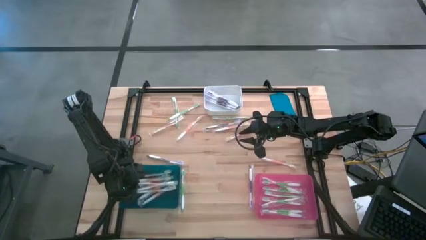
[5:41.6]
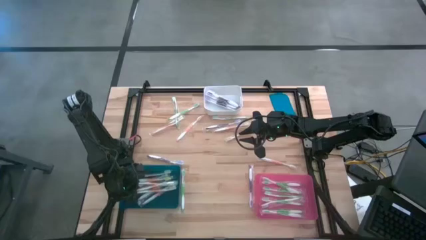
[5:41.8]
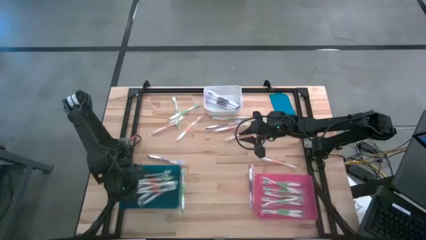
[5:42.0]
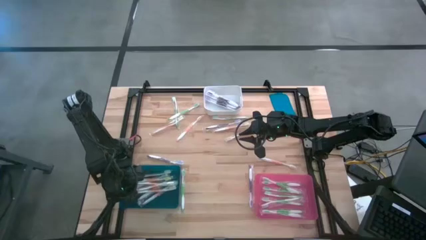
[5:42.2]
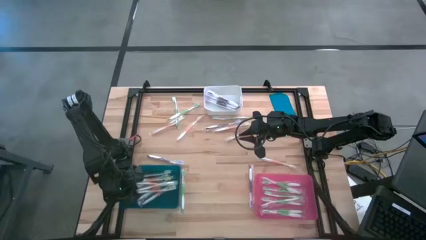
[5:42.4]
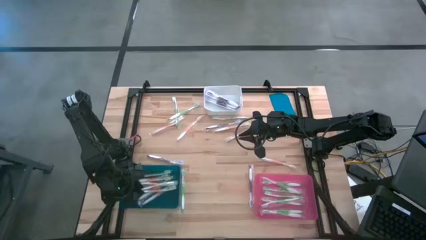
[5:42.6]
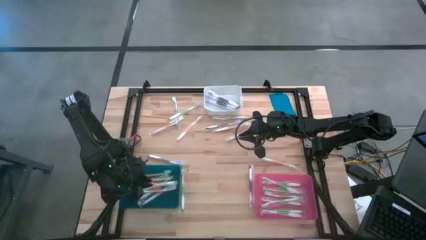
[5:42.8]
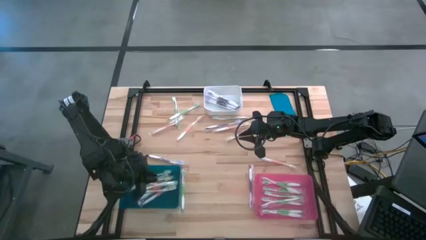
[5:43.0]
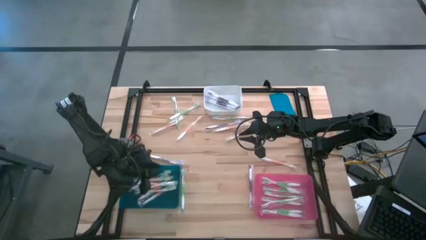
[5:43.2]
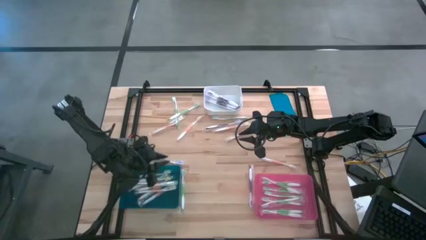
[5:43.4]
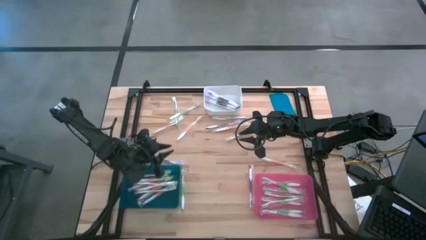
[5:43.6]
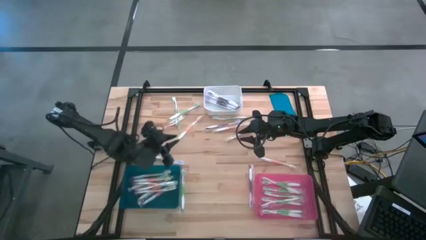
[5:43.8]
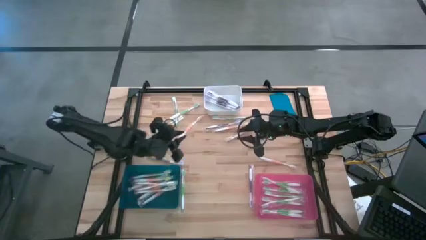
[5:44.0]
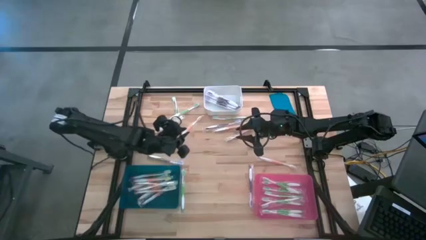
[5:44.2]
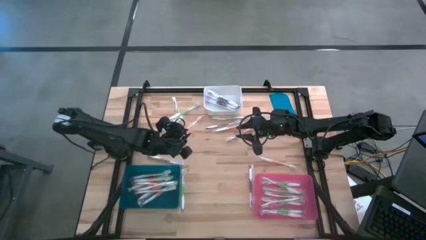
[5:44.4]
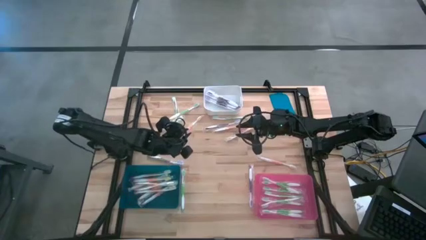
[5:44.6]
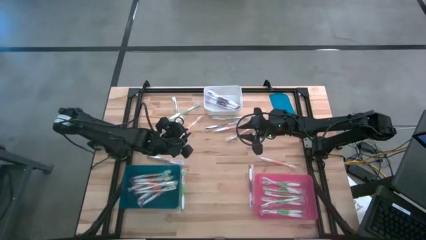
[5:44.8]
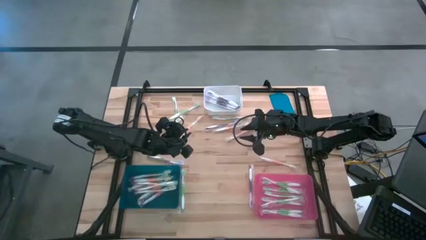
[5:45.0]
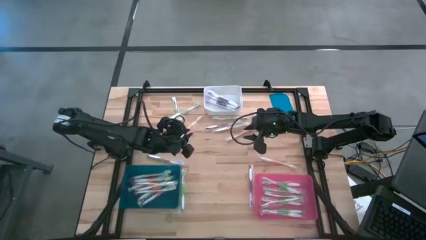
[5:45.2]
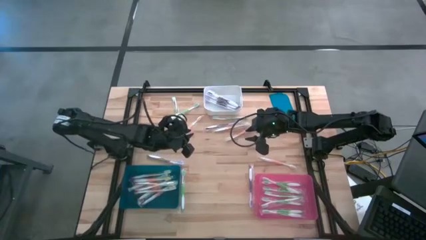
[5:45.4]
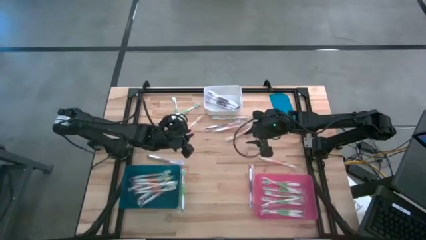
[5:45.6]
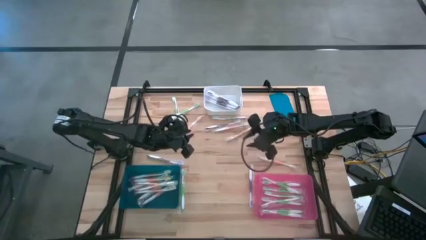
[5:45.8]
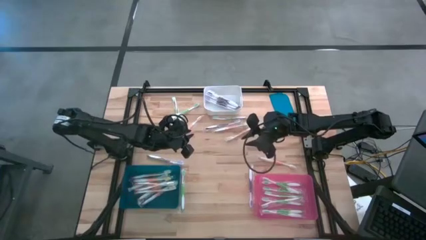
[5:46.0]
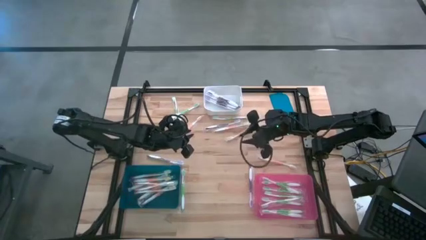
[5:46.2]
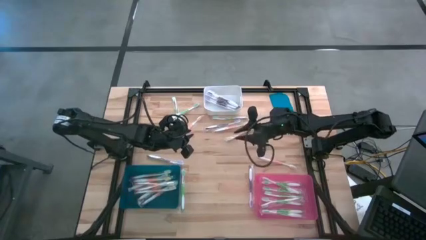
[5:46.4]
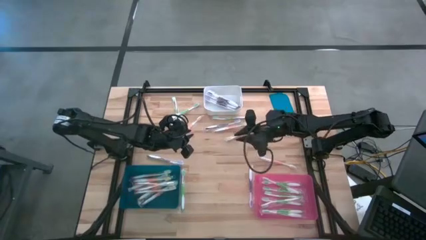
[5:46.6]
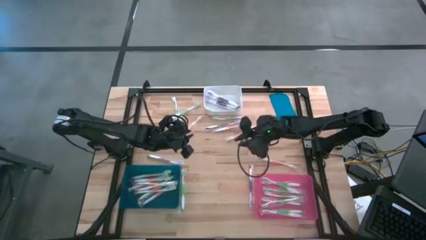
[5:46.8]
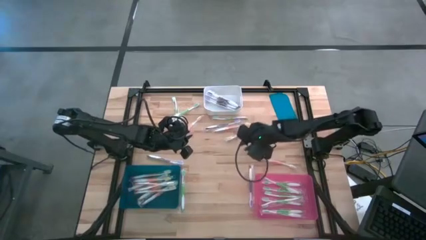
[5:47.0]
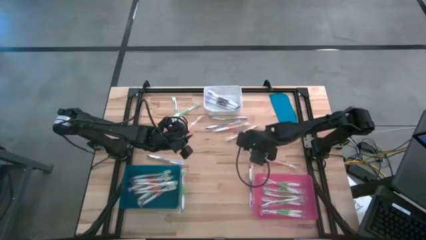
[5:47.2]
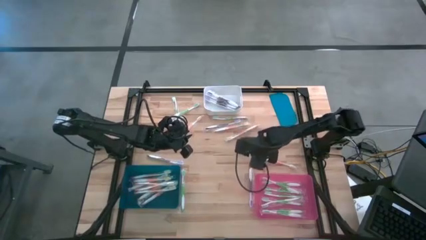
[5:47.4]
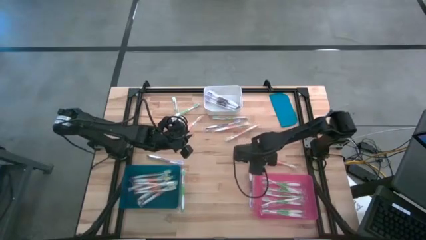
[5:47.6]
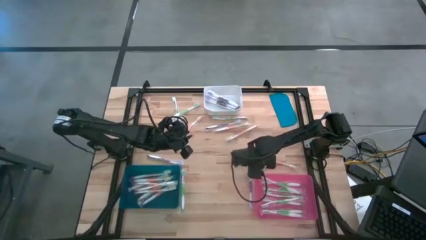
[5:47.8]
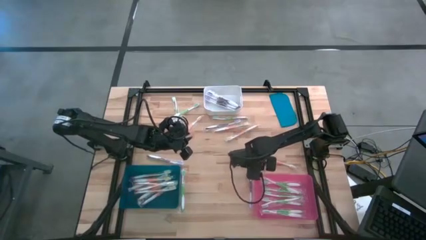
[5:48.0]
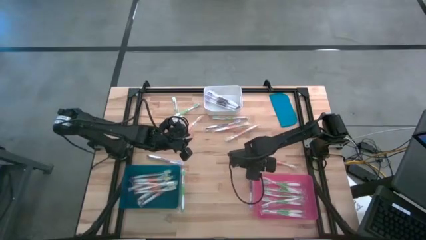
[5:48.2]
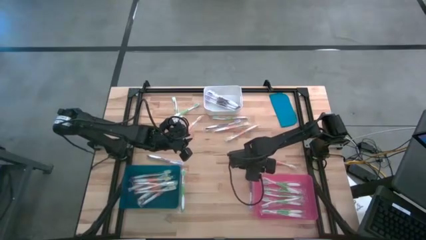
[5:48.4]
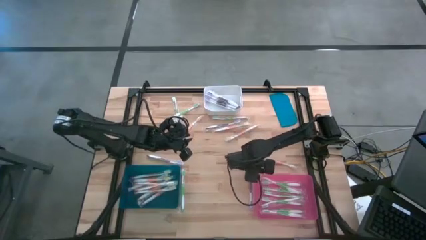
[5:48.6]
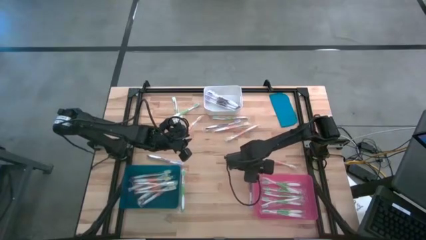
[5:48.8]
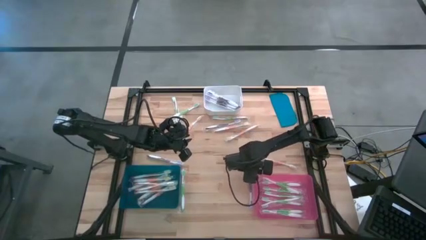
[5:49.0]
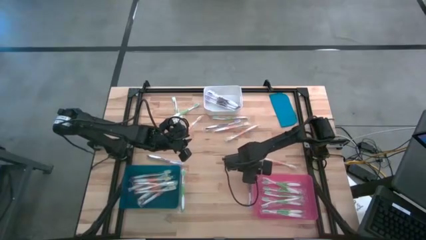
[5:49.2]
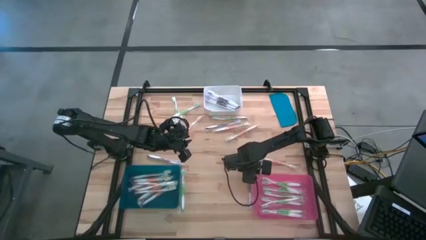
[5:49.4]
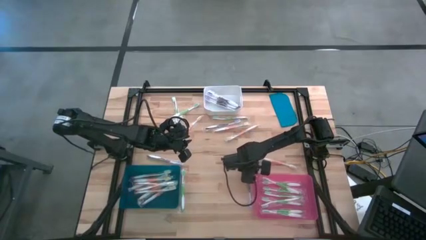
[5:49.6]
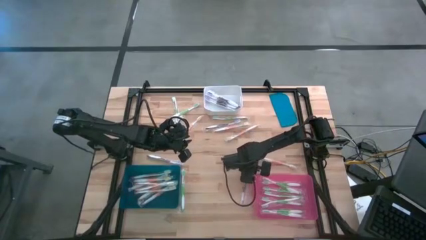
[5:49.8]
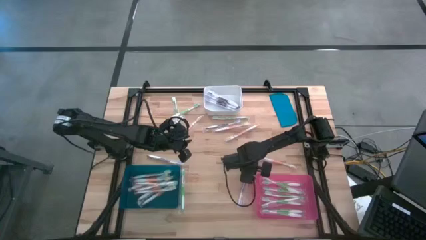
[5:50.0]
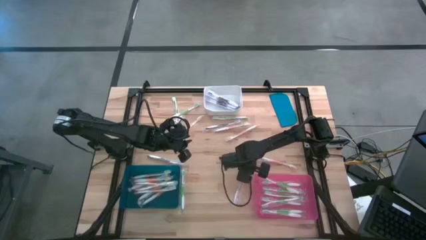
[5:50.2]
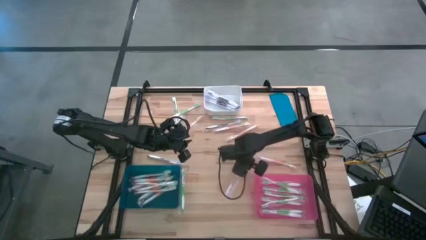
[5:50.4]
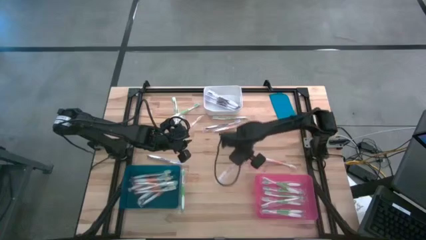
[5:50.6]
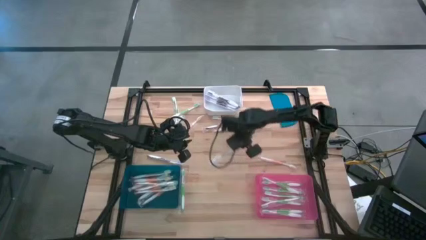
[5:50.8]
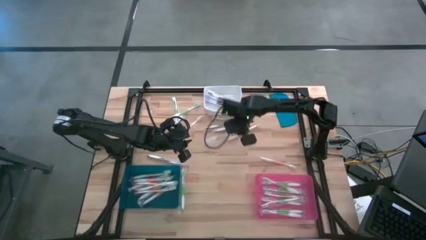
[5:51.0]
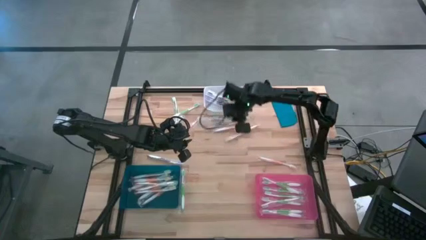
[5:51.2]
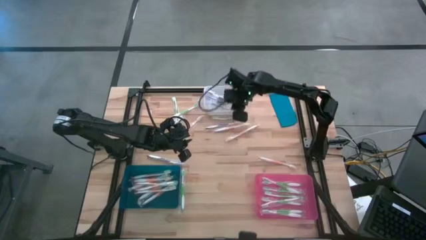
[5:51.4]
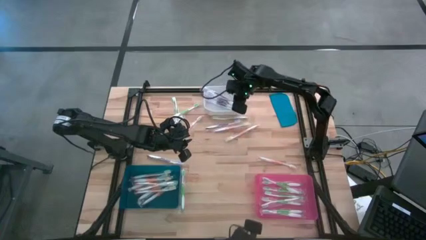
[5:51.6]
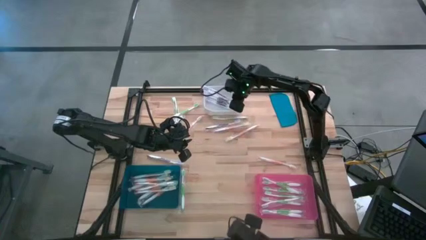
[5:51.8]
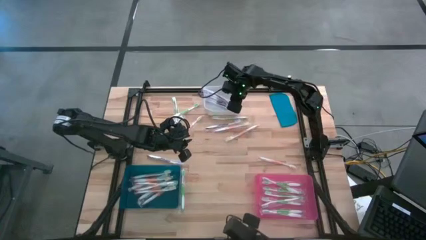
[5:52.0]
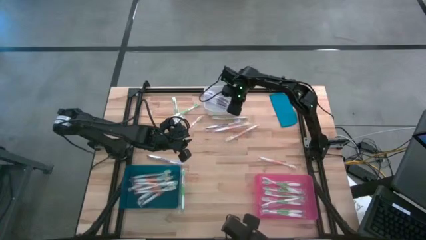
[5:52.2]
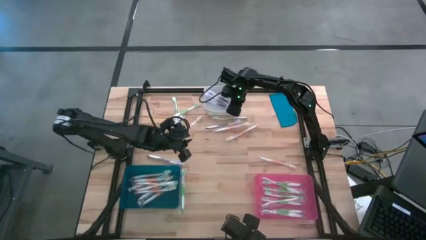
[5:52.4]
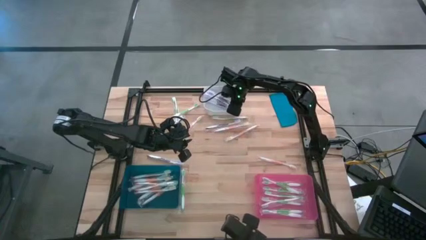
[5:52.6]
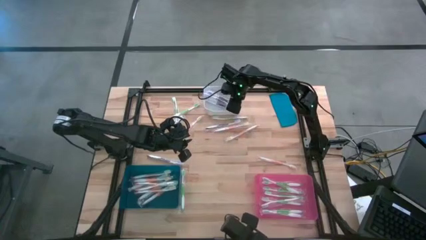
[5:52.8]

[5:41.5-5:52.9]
Task: Pick & Place Toothbrushes
Put the violet toothbrush into the white bin
